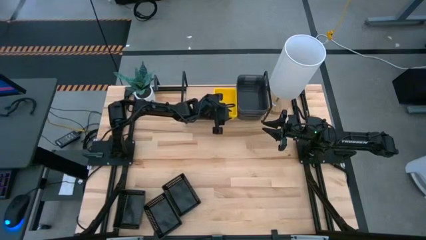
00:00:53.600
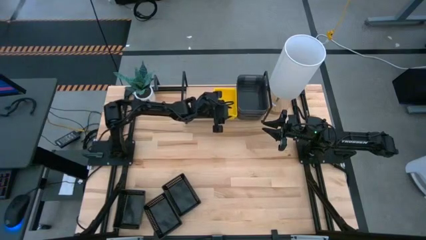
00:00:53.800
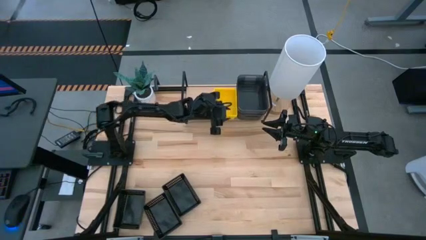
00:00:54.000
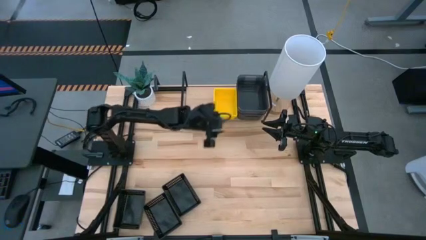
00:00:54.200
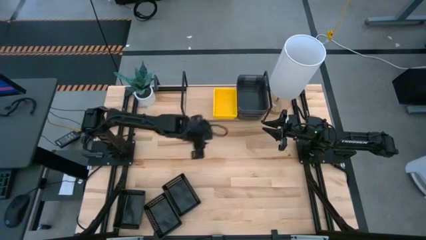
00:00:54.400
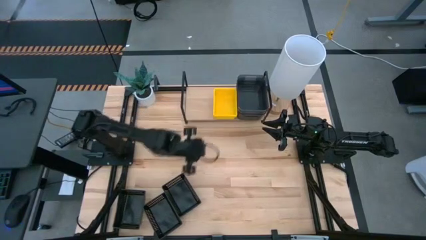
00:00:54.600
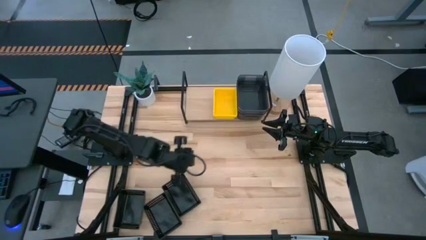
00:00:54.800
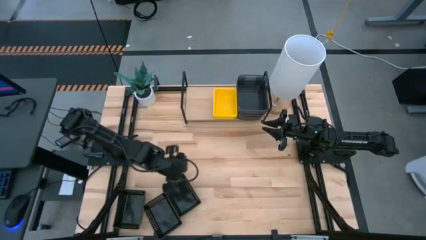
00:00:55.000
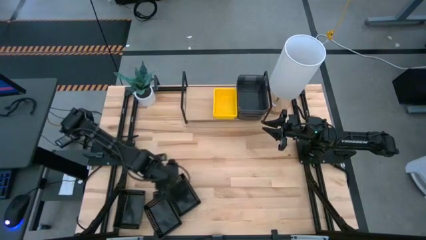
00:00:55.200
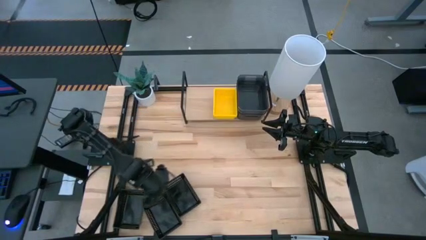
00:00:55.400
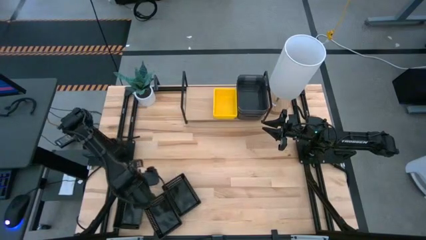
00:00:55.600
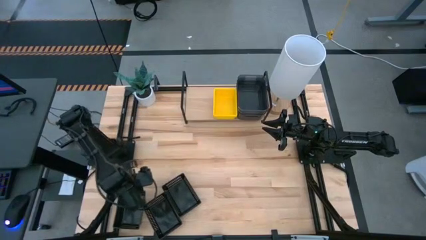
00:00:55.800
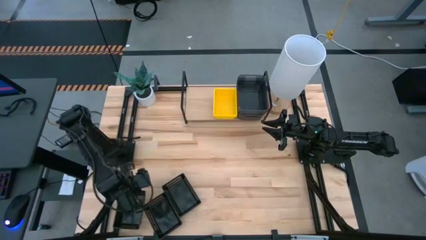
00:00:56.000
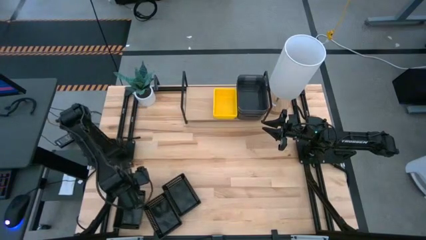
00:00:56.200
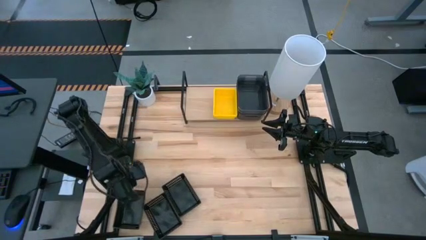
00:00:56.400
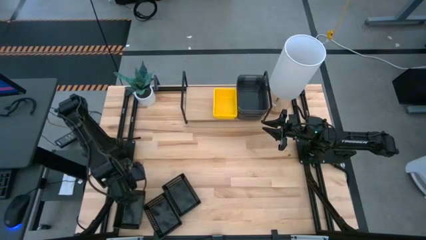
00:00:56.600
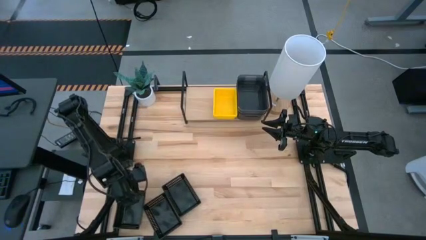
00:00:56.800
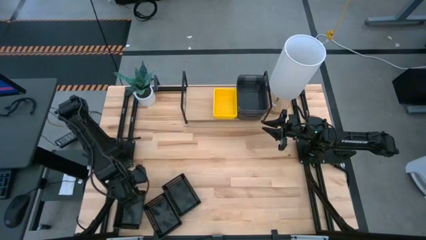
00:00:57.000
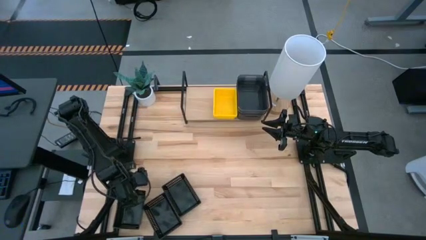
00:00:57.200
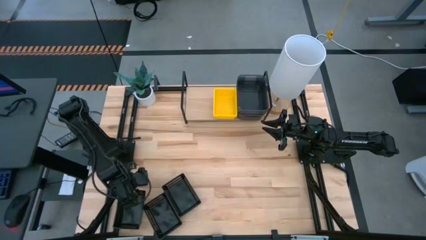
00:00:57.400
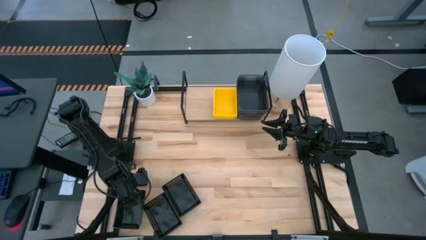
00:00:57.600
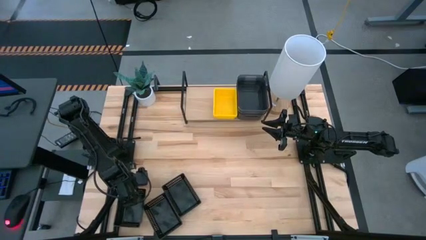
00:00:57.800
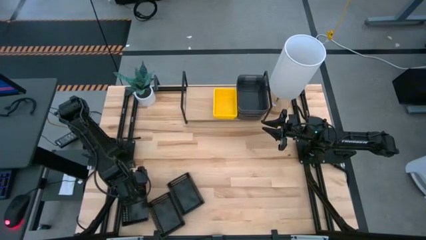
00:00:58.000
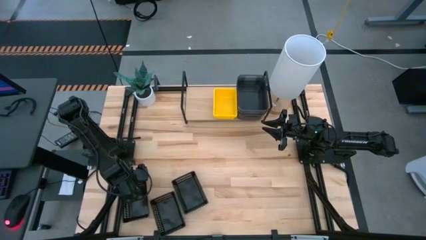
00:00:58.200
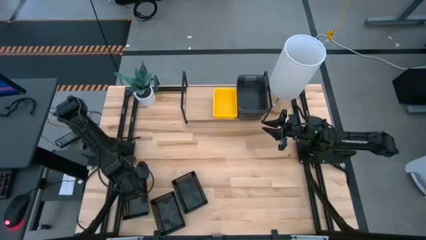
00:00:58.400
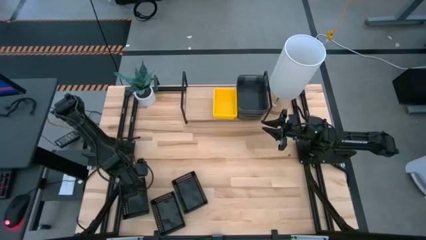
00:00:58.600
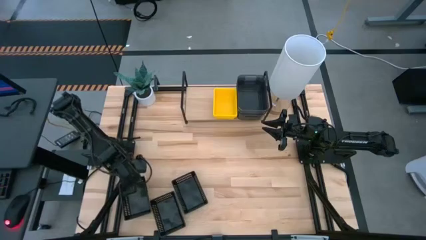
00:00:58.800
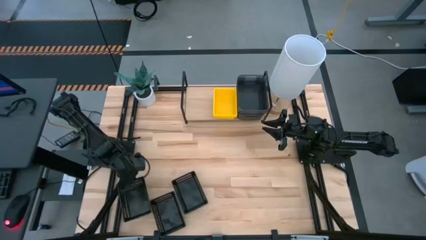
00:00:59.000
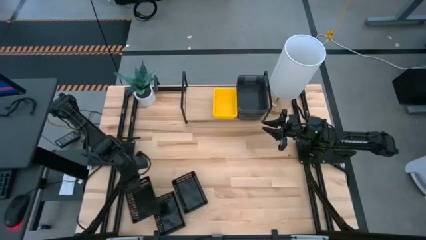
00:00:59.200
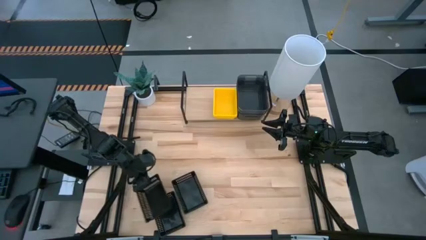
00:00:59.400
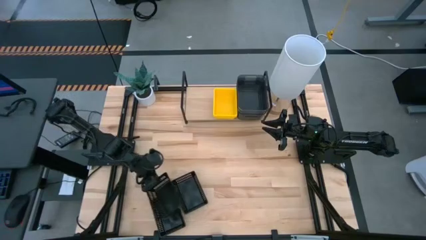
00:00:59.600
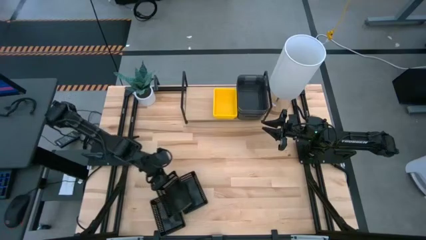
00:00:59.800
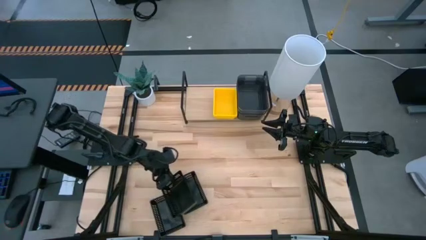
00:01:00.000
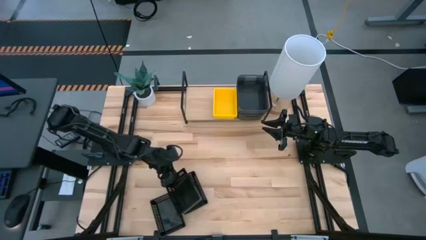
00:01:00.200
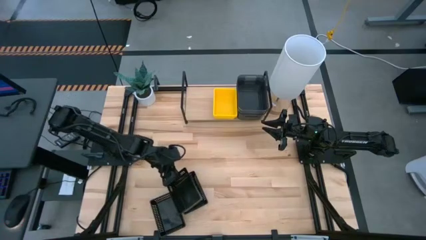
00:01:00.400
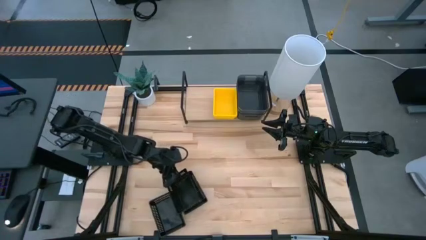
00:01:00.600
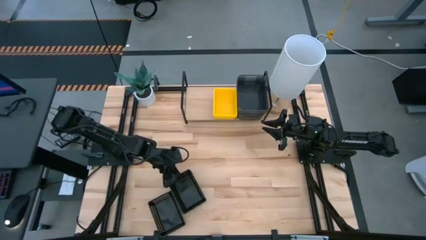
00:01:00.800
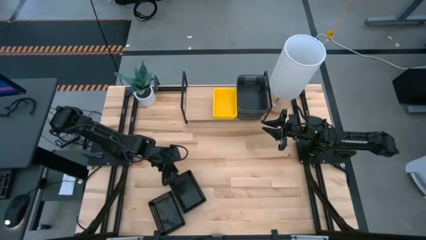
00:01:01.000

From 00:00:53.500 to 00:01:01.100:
Task: Stack baskets on shelf by color
Stack the left black bin on the right black bin

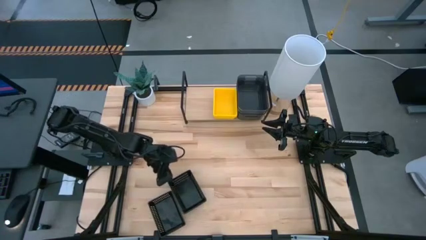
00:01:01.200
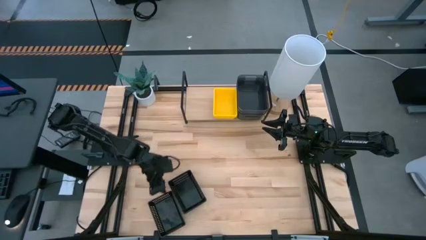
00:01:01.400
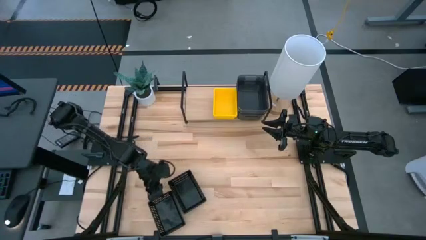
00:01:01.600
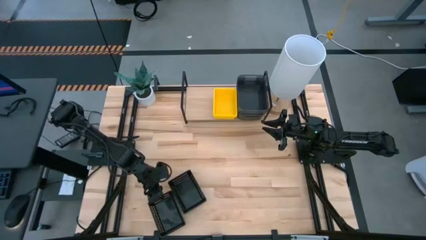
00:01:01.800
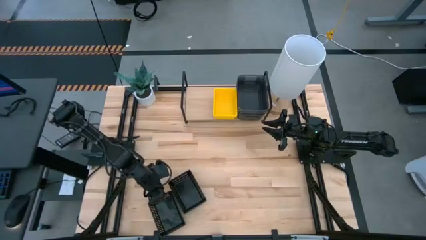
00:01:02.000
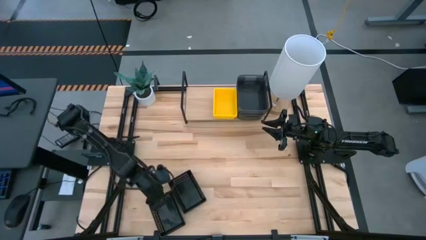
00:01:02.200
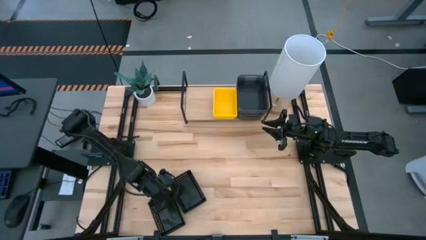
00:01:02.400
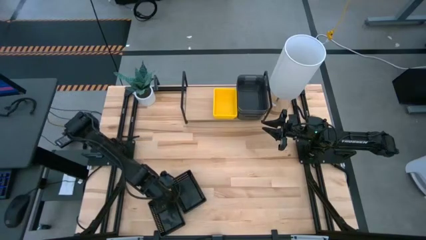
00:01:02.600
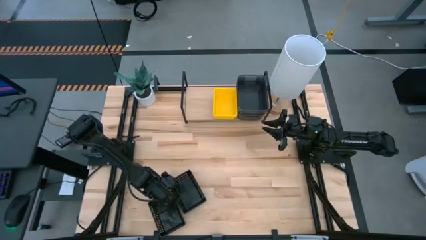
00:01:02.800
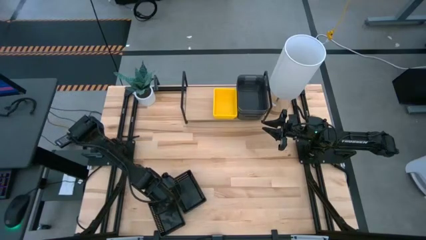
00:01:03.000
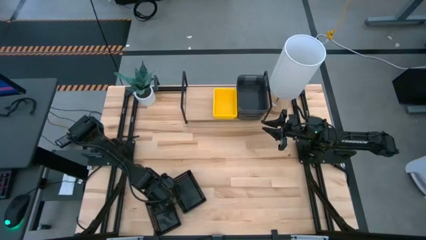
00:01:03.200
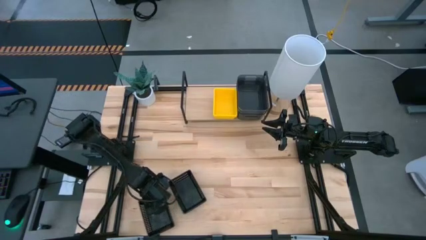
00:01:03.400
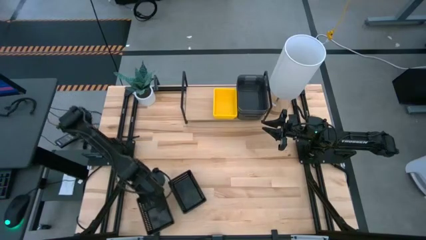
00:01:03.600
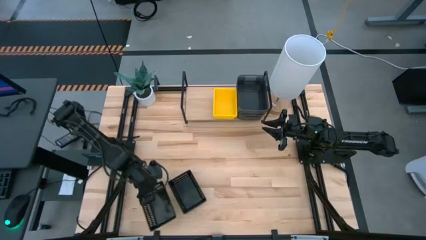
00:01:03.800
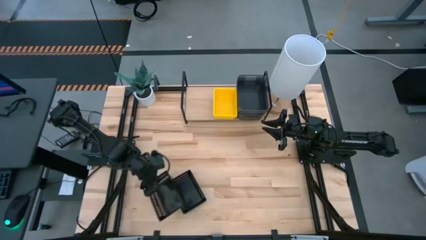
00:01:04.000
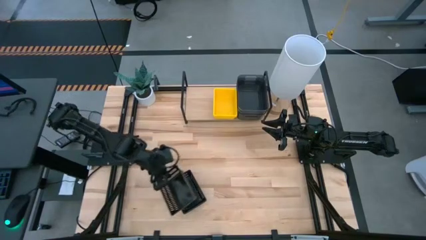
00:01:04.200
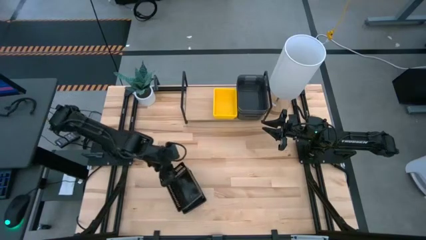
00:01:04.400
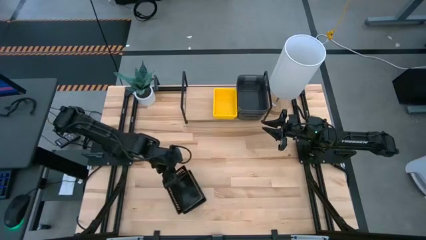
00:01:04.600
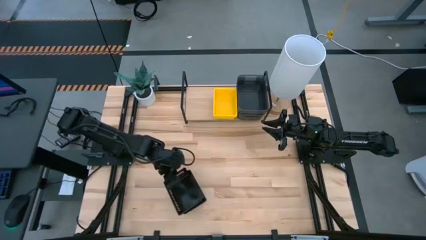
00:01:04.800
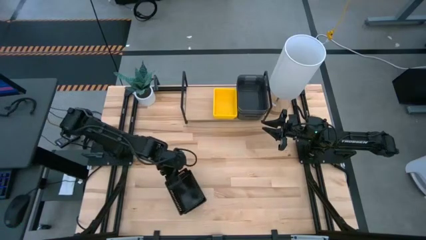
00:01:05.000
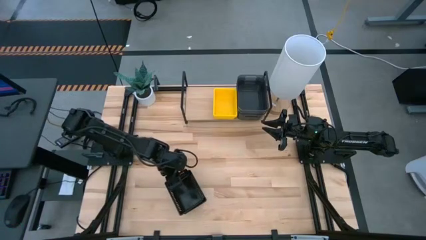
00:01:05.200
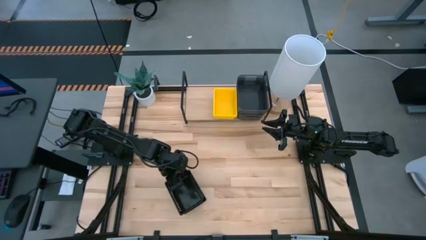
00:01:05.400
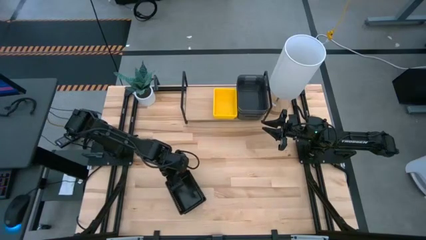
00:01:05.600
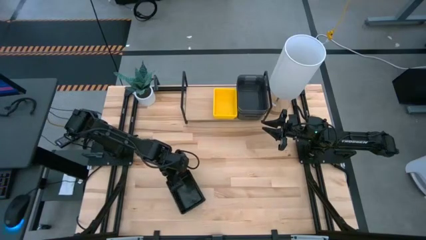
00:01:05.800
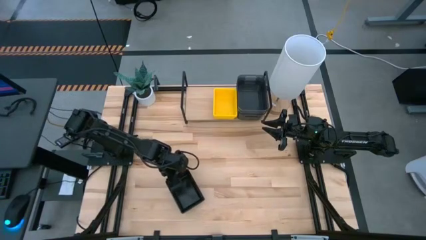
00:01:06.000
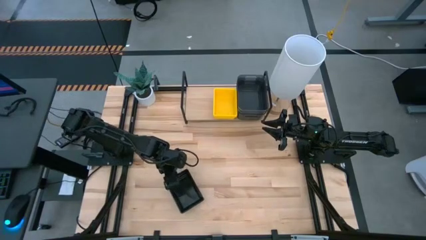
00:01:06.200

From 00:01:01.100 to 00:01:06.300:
Stack the left black bin on the right black bin

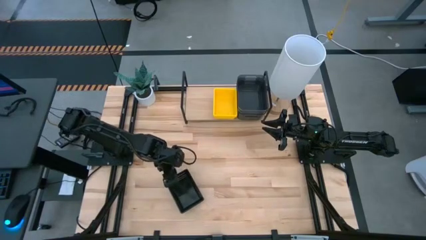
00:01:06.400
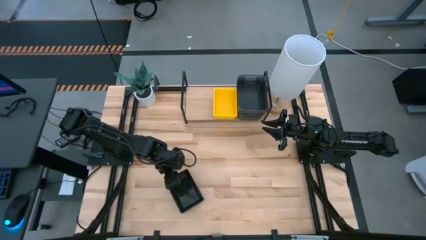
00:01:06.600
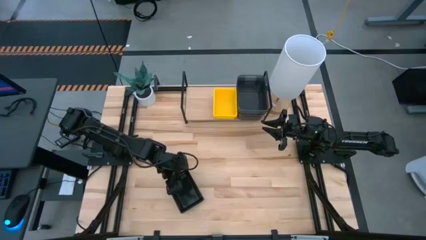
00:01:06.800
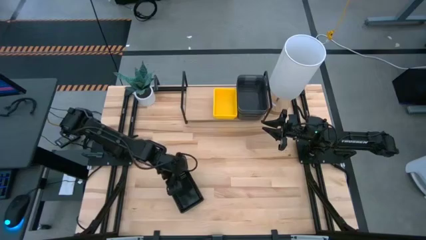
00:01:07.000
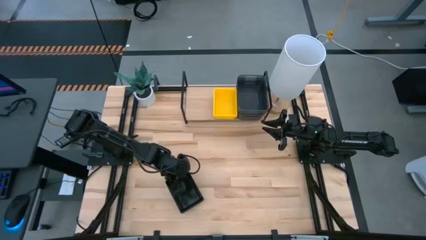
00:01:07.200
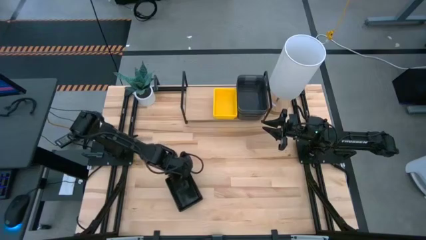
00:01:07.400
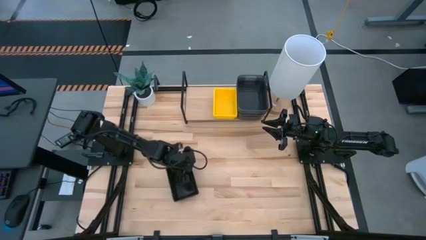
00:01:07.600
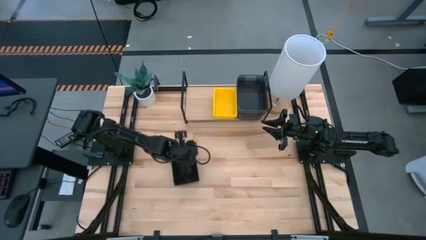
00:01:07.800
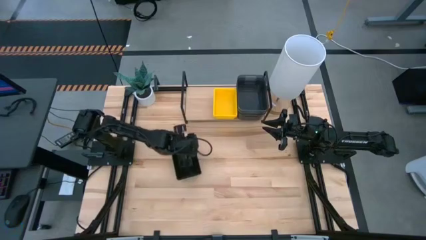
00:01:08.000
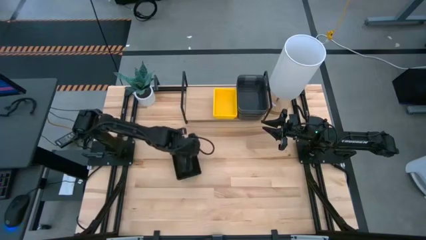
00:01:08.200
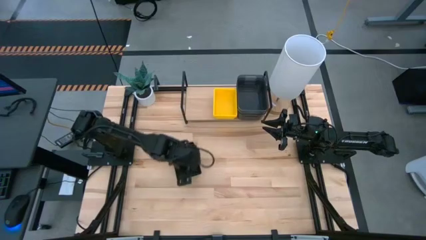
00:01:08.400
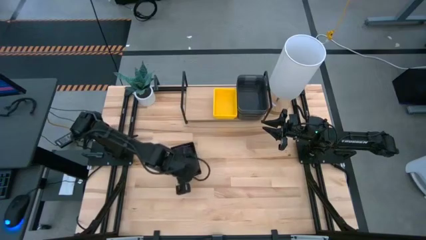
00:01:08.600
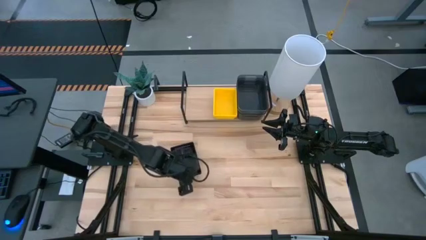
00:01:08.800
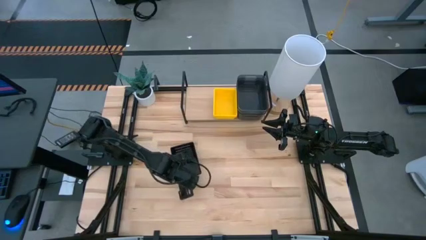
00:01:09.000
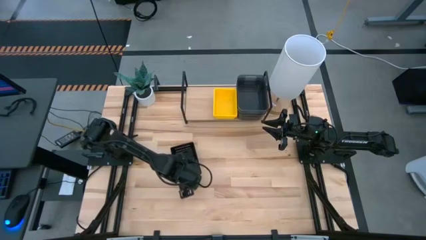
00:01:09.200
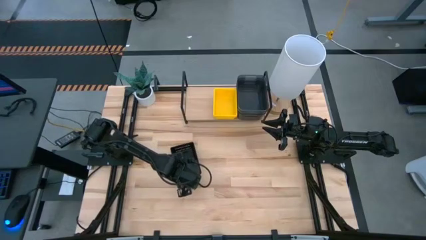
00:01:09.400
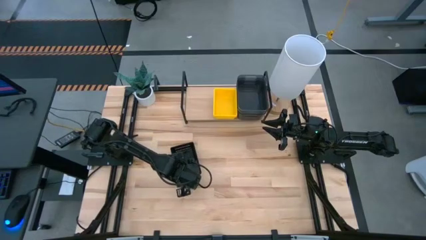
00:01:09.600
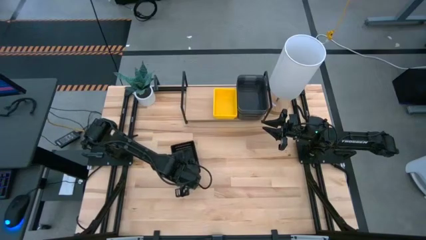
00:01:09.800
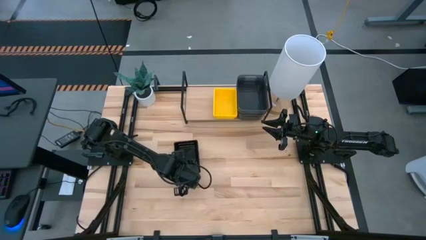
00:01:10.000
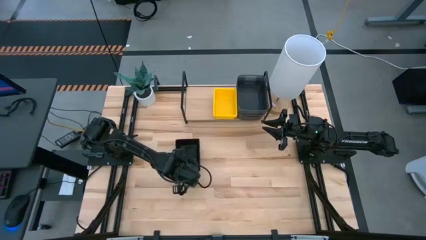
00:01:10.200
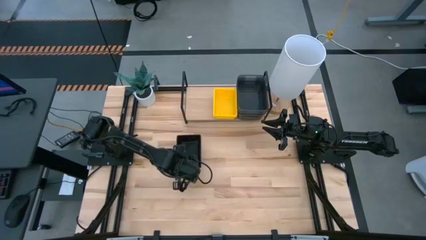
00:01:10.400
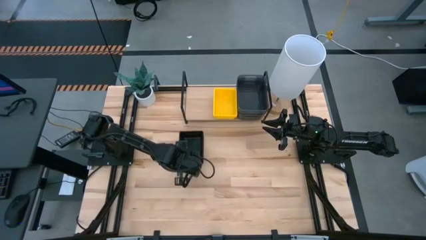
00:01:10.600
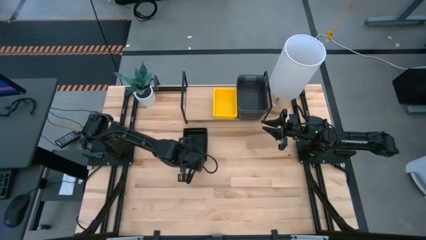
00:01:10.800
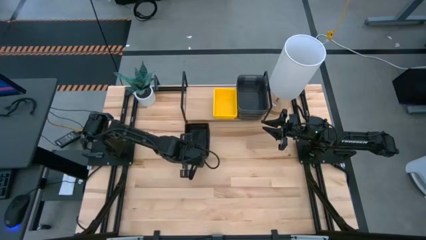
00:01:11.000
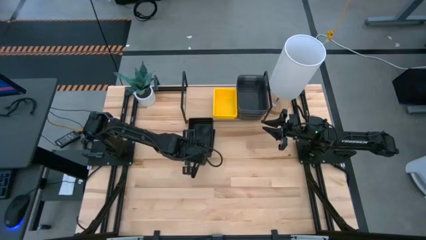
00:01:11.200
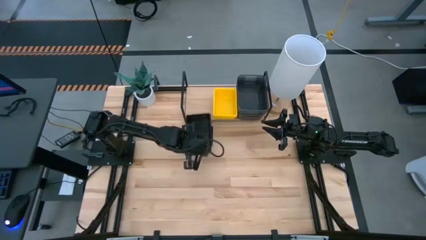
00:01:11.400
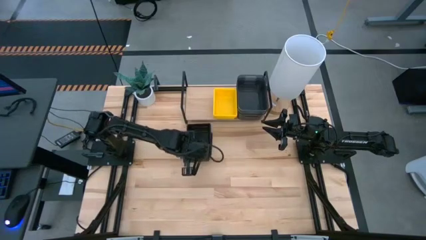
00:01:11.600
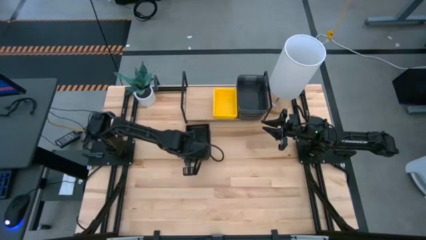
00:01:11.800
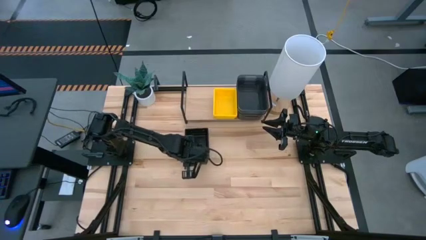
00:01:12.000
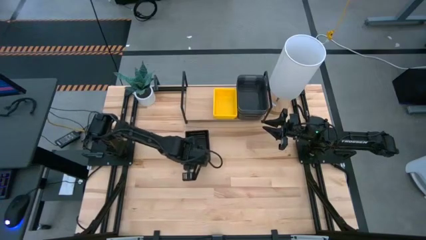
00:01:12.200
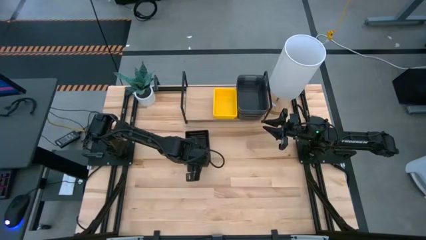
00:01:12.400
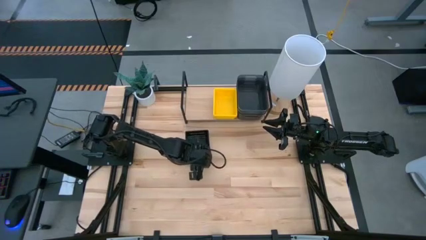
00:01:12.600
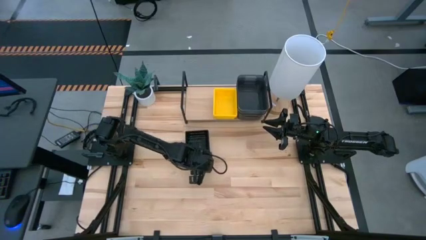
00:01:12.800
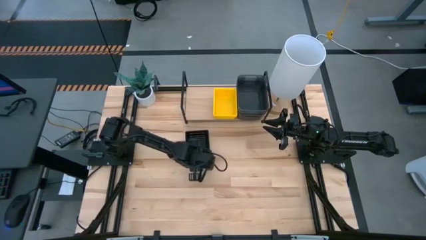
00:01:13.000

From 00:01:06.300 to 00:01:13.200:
Put the black bin on the shelf
